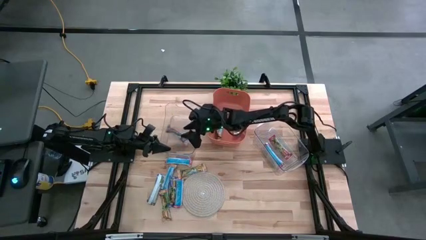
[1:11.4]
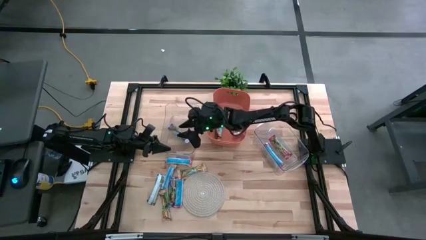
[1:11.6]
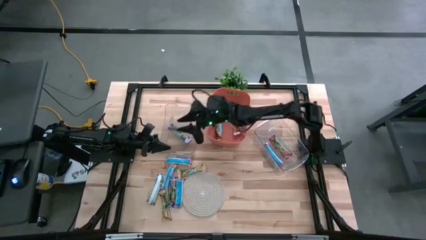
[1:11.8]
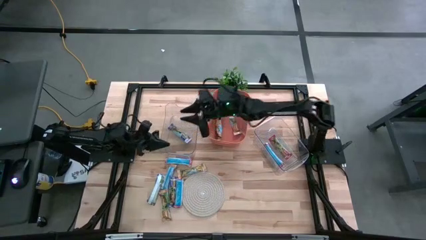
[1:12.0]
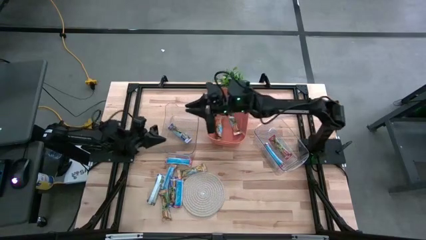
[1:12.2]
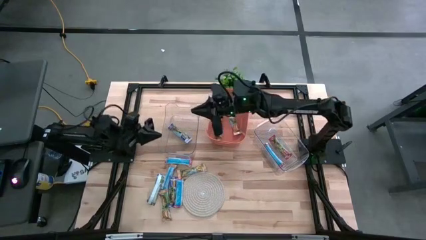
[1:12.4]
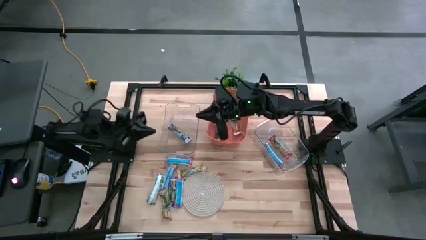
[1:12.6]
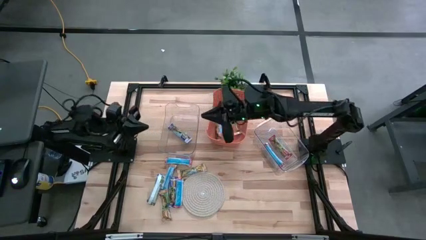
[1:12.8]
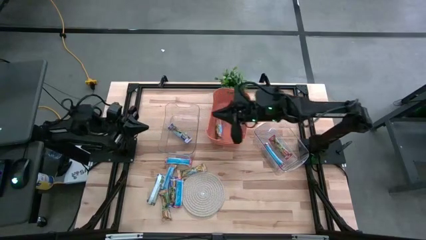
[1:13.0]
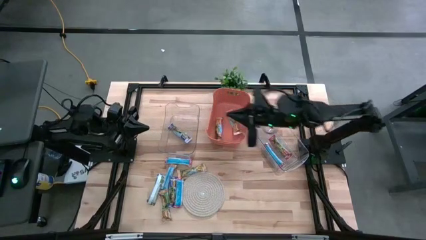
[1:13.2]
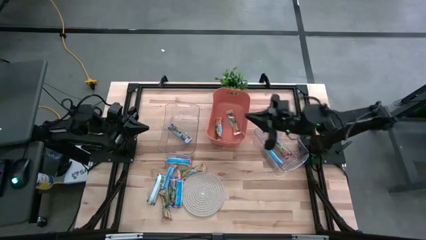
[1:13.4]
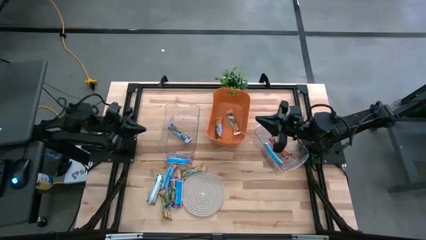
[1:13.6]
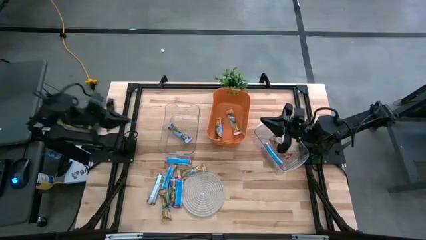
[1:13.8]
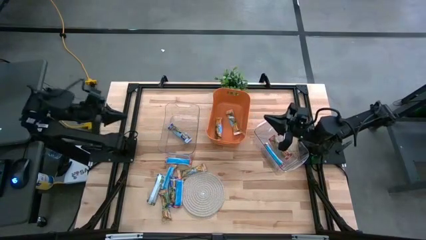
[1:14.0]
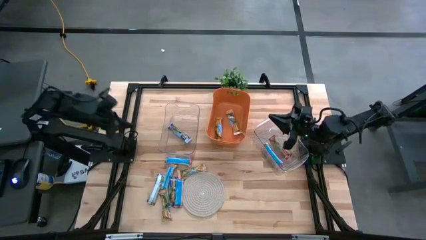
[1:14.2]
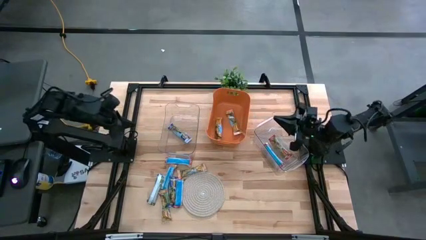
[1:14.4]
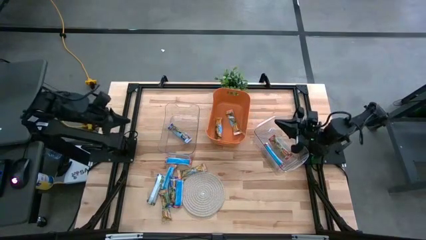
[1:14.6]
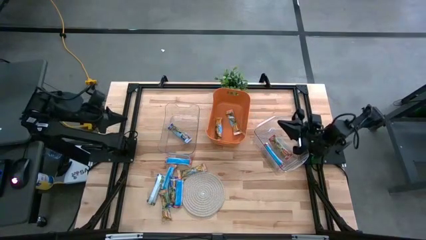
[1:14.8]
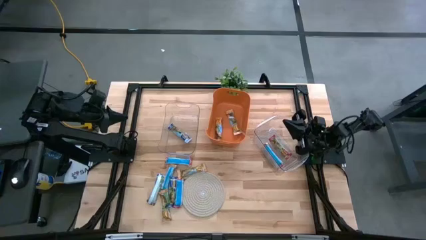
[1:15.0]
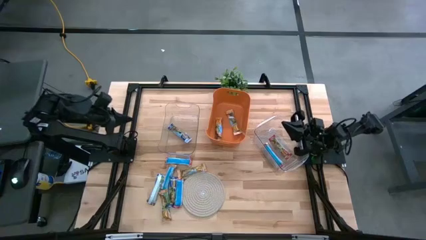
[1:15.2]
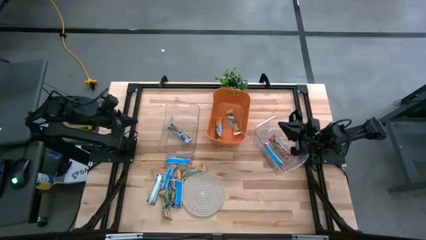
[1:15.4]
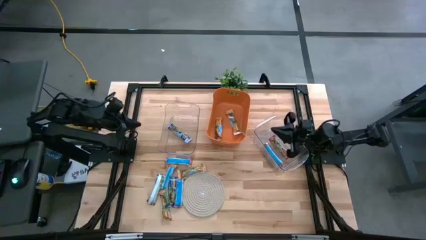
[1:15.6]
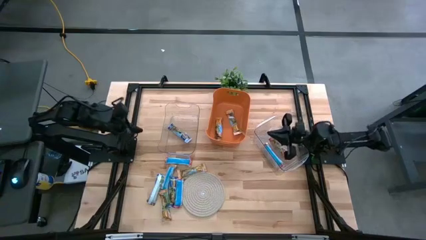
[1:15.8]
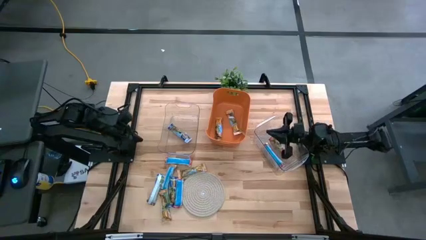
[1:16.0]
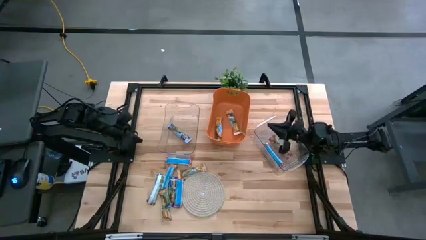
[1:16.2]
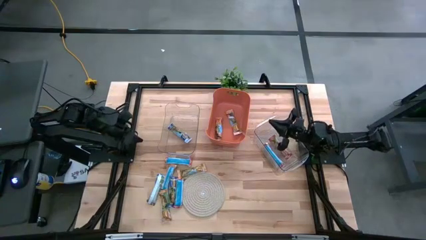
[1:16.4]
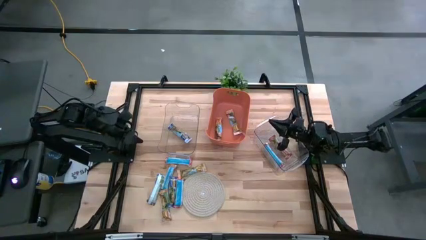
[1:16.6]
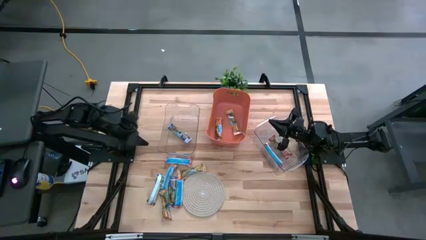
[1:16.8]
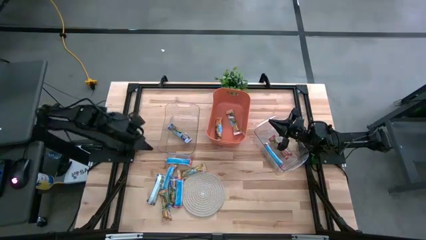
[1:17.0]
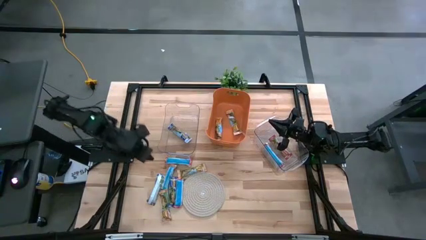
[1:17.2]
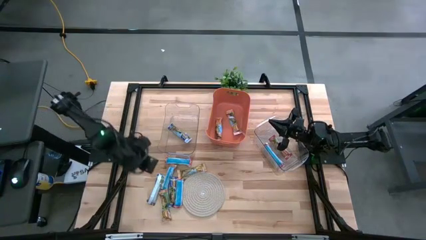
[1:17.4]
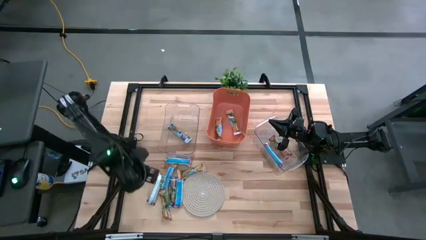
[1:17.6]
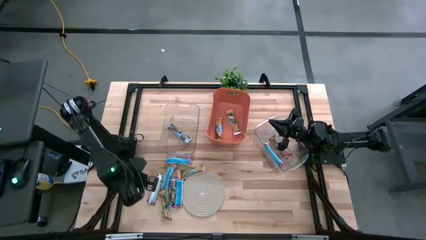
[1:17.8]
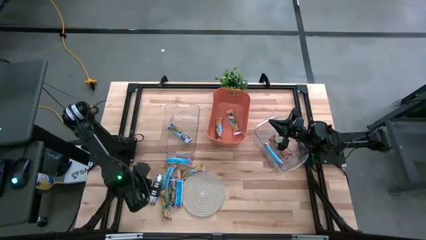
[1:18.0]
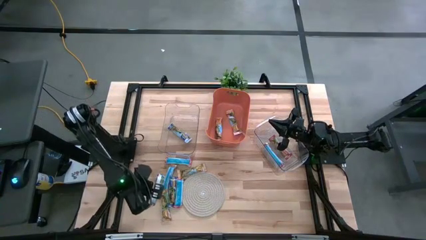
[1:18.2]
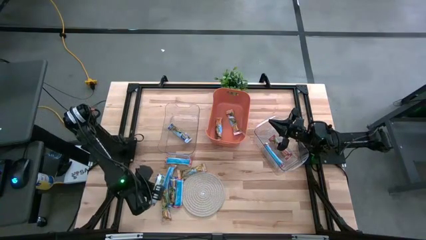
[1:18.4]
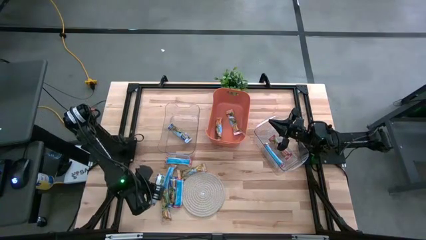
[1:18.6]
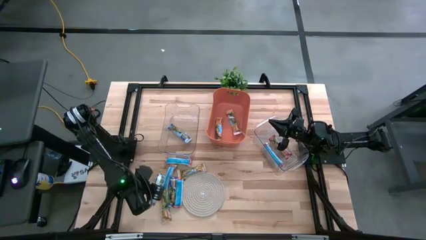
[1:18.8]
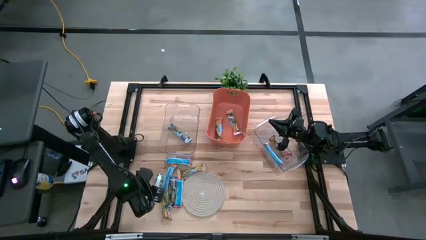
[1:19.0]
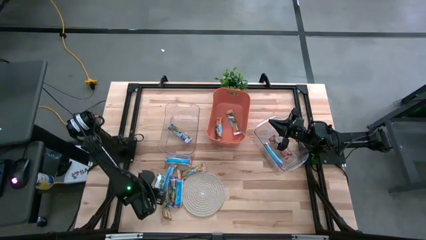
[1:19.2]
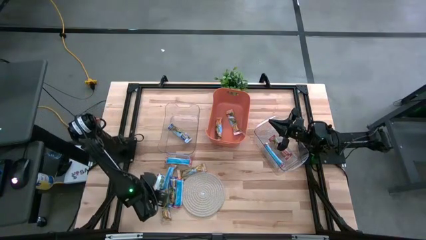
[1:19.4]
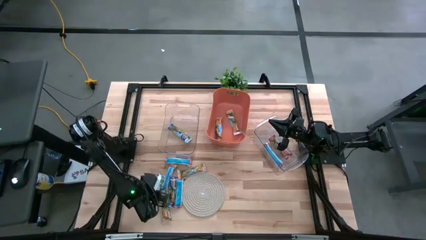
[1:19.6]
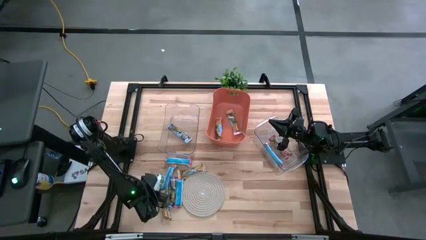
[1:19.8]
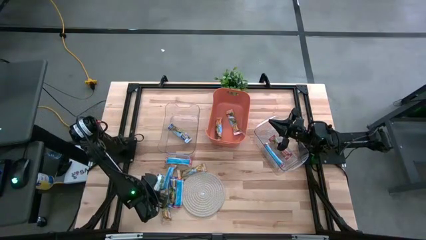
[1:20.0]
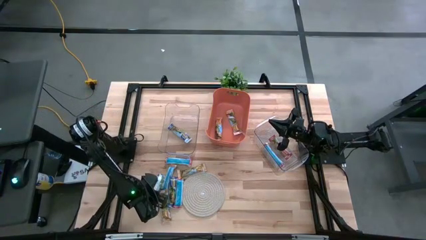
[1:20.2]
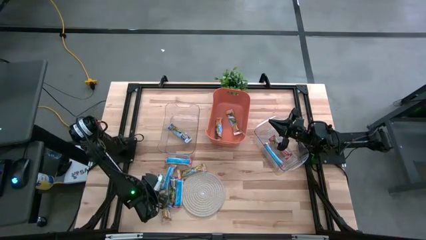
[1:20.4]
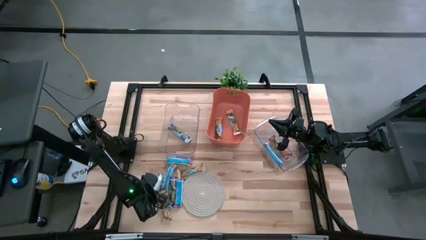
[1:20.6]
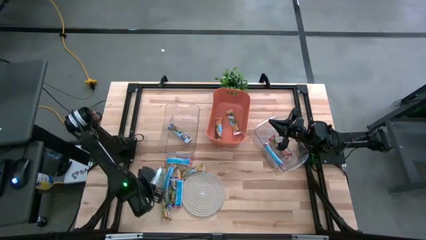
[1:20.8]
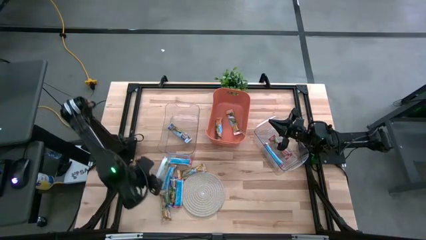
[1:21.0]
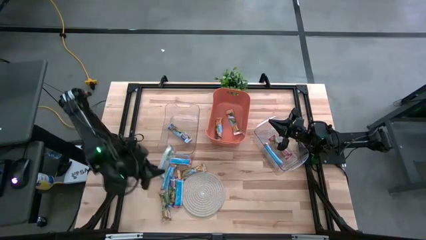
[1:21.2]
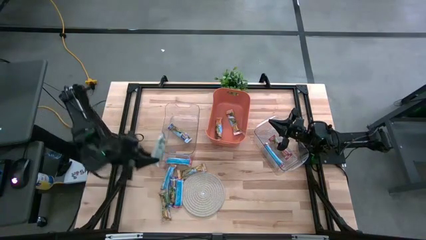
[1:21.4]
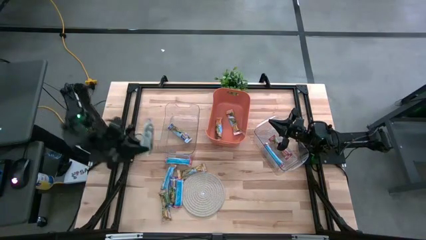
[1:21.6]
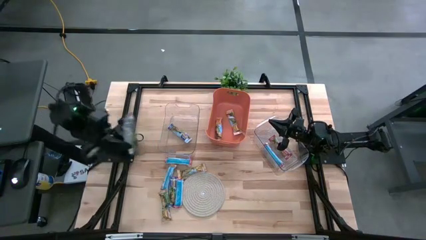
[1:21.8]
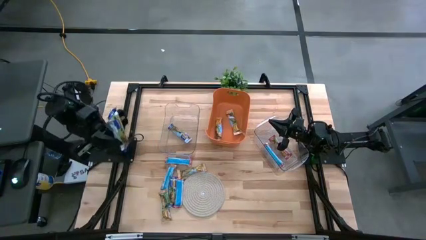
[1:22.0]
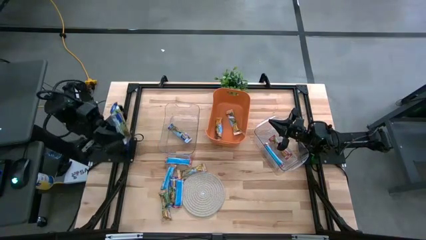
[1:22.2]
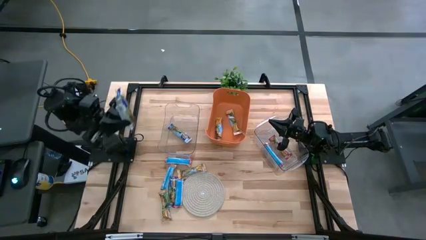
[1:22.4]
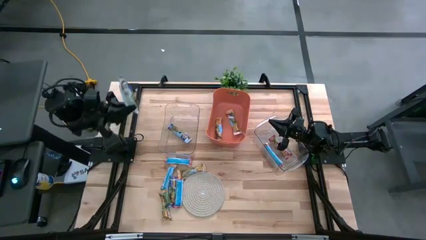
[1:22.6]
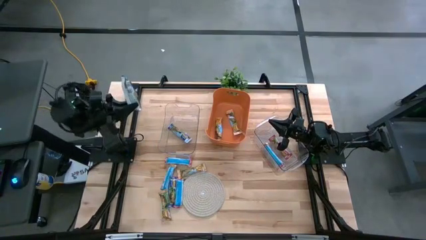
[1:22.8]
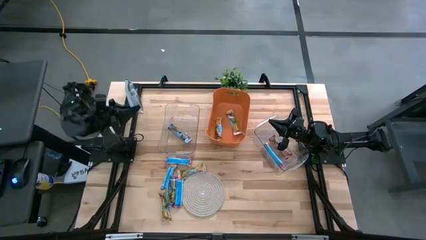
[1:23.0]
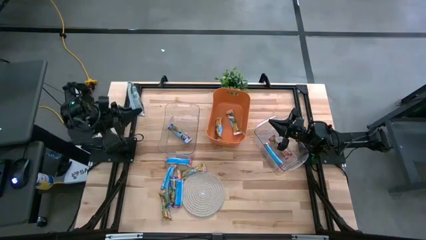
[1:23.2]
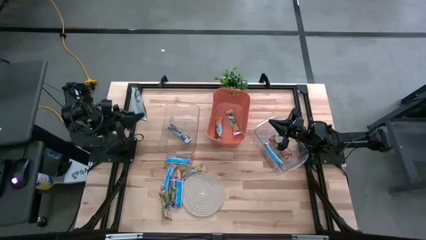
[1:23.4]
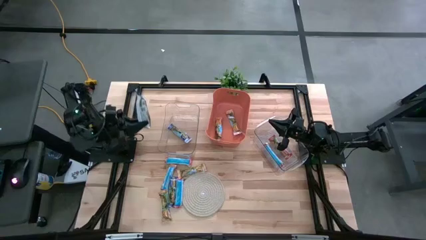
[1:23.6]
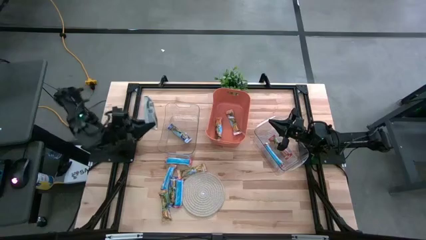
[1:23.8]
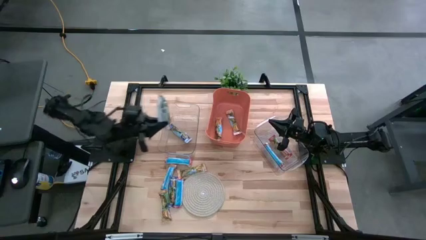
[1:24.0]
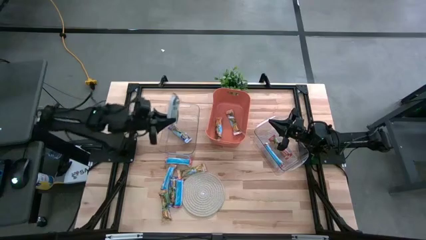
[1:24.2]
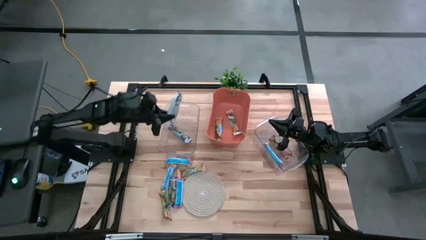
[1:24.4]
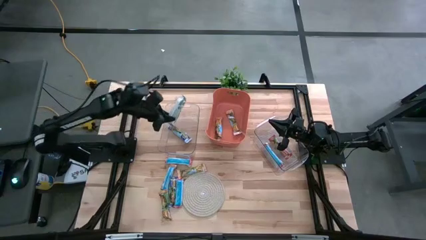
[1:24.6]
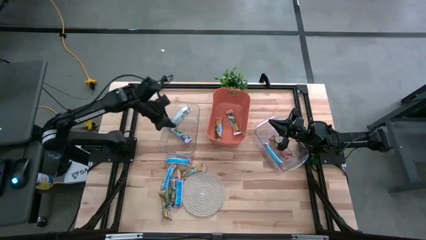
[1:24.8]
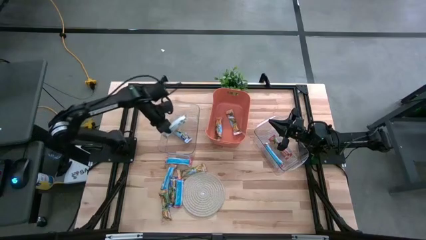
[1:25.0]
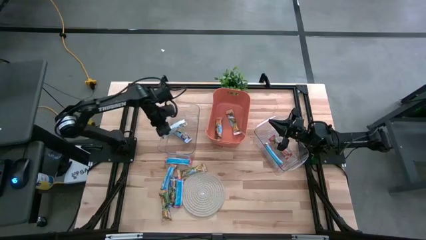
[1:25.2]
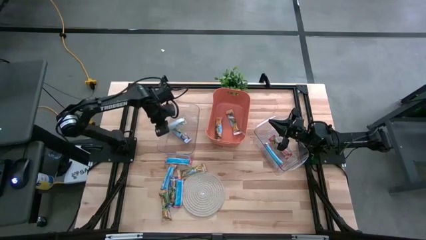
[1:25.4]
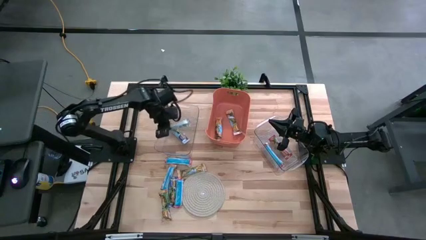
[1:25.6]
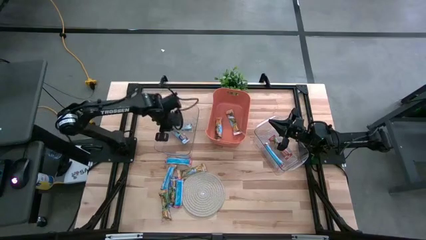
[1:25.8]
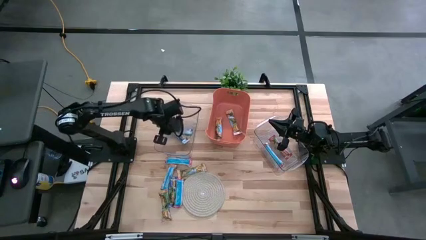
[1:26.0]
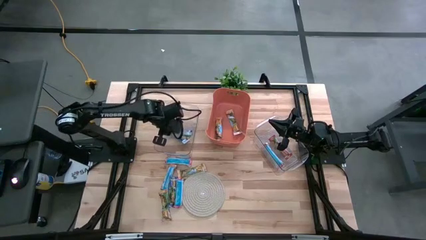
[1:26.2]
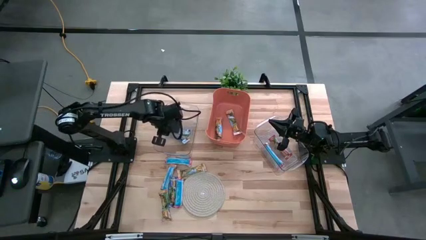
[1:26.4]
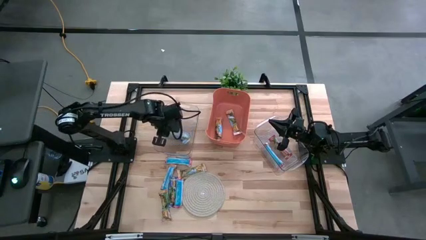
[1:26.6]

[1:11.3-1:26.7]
Task: Pick and place Granola Bars by type
Put the blue granola bar into the left transparent bin

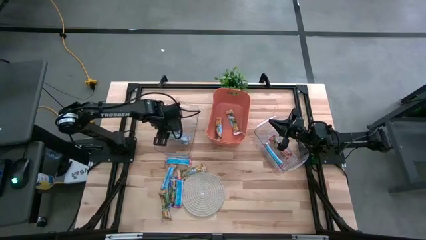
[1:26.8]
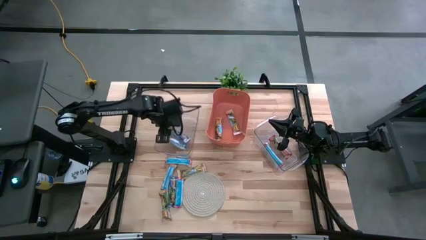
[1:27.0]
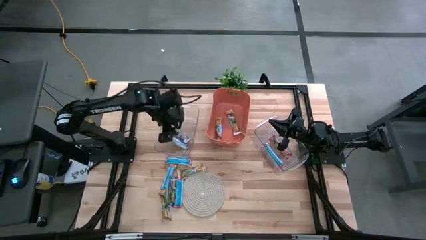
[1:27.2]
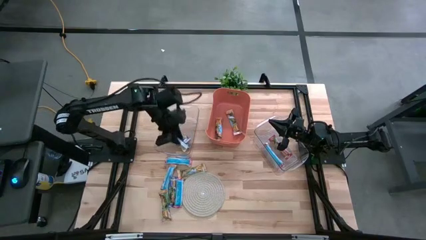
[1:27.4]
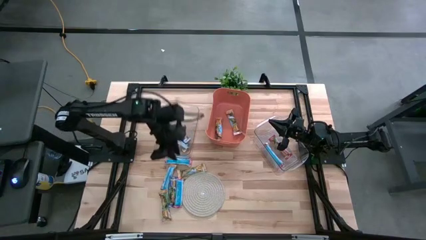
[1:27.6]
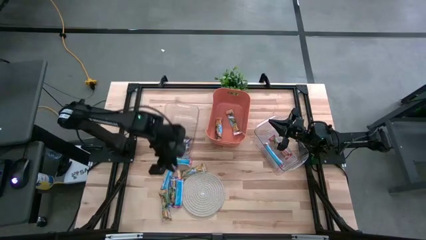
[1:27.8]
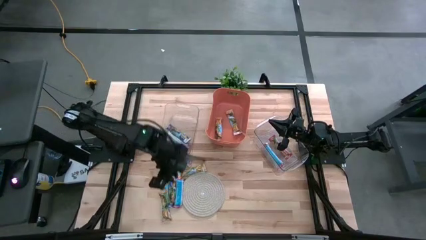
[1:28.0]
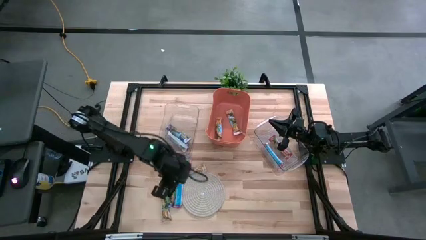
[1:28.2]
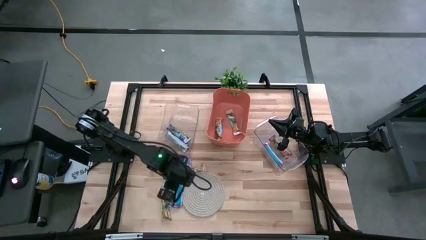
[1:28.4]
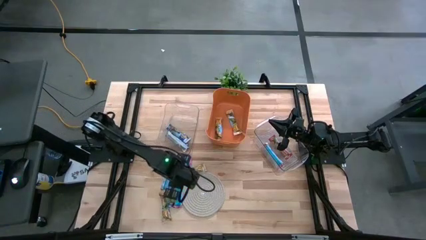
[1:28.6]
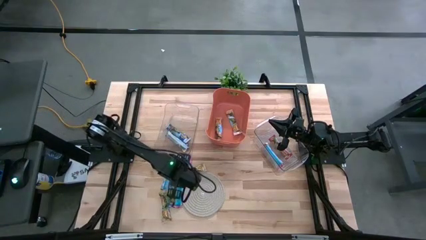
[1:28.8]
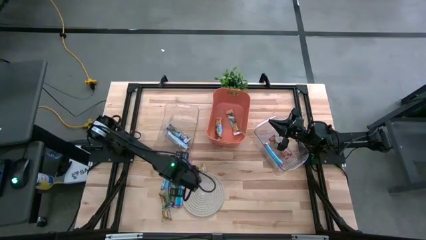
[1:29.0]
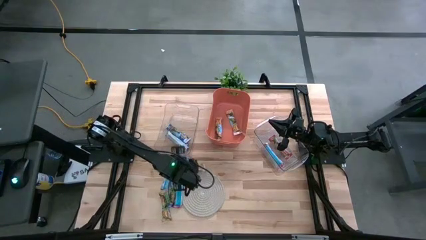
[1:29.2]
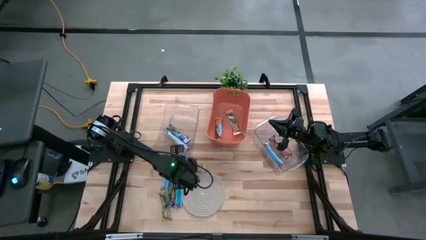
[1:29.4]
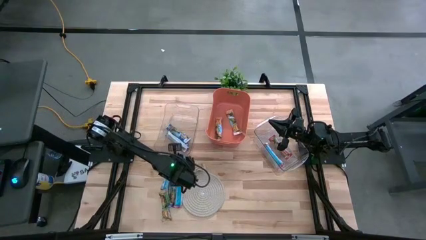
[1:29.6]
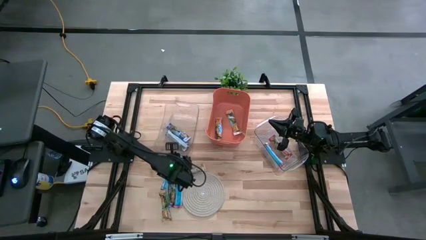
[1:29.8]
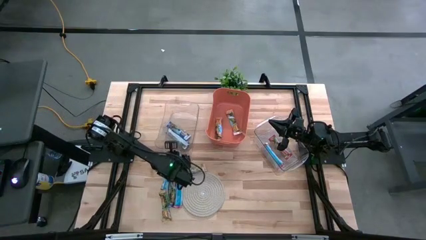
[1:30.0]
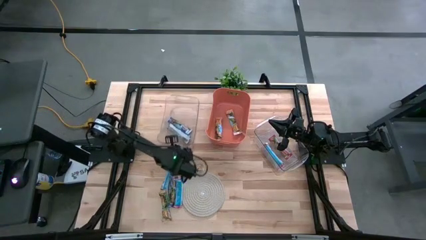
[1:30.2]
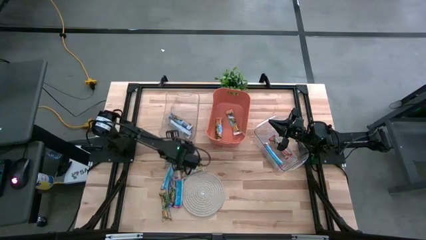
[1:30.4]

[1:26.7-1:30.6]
Adjust the left transparent bin
